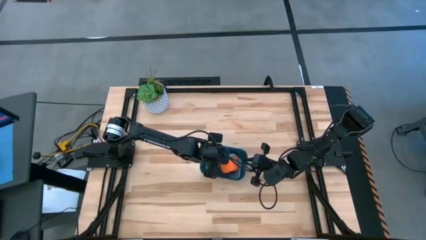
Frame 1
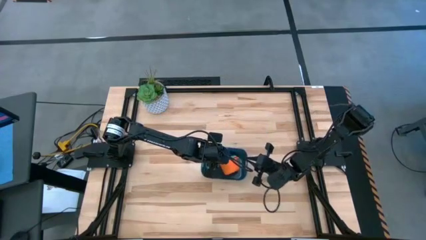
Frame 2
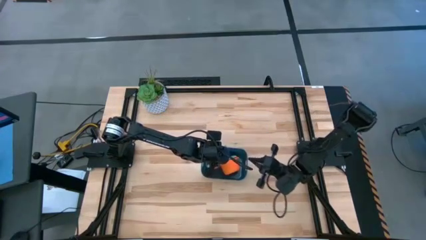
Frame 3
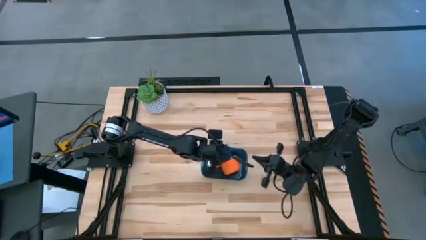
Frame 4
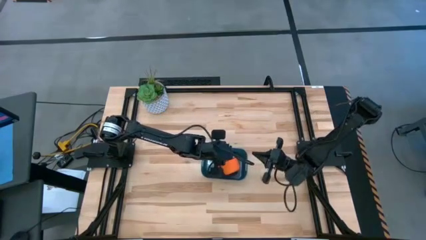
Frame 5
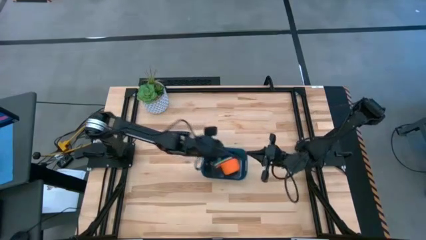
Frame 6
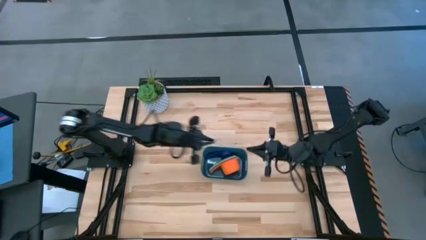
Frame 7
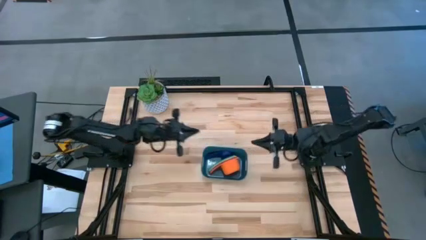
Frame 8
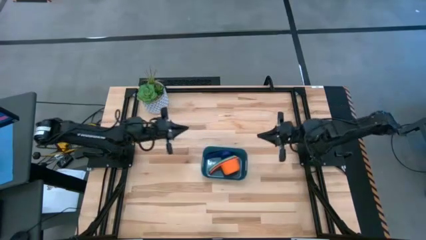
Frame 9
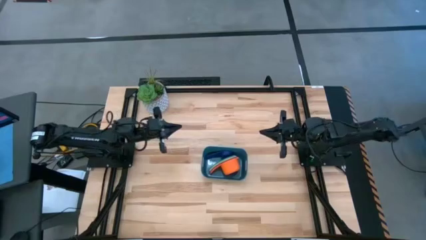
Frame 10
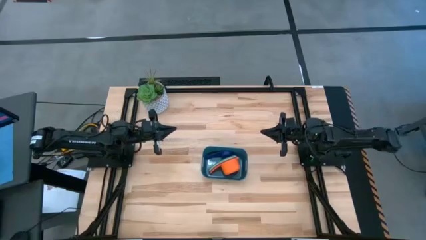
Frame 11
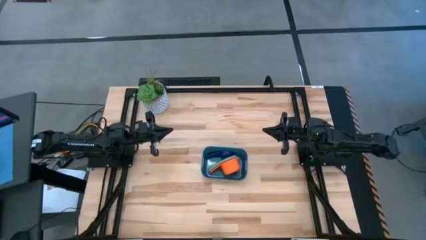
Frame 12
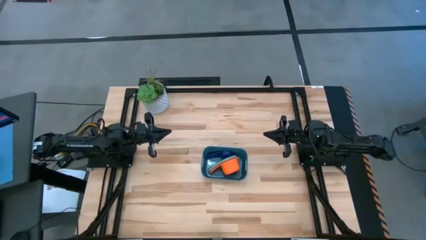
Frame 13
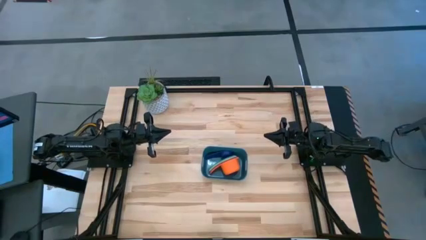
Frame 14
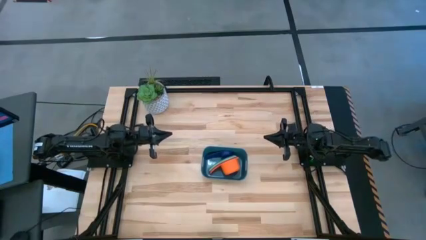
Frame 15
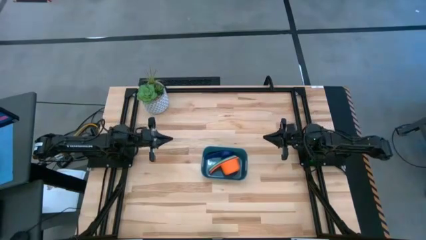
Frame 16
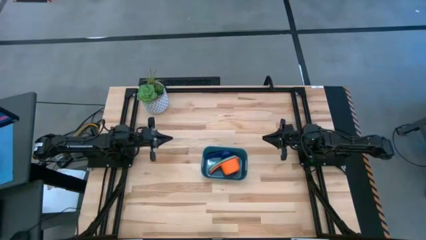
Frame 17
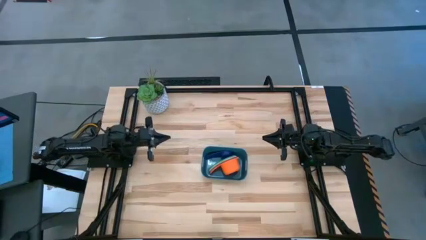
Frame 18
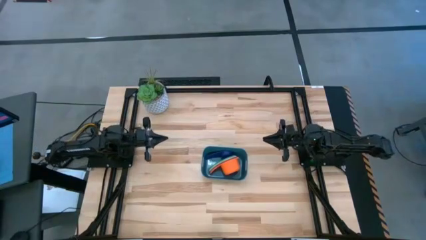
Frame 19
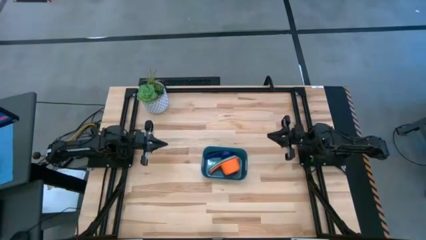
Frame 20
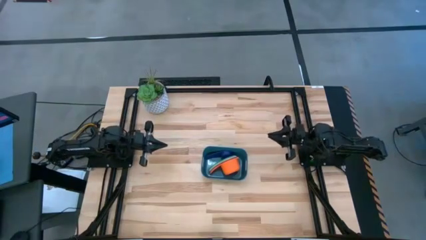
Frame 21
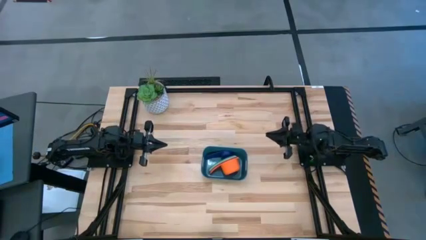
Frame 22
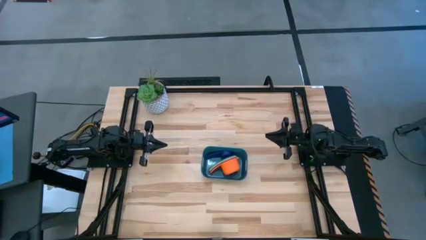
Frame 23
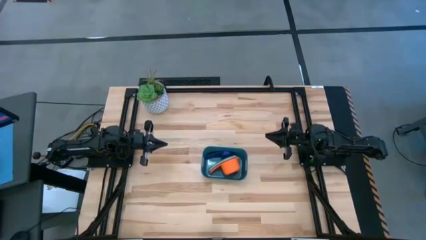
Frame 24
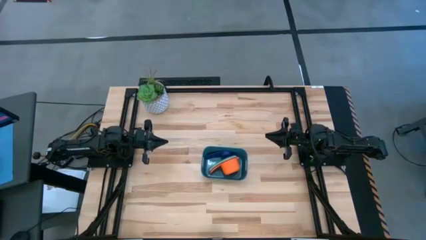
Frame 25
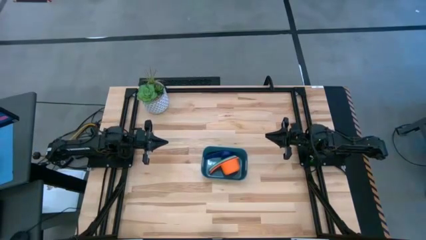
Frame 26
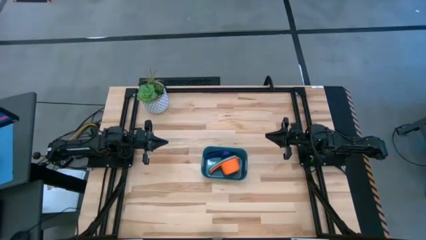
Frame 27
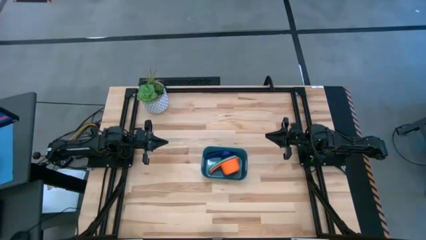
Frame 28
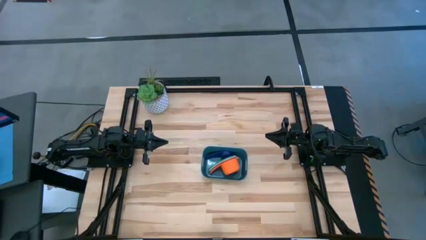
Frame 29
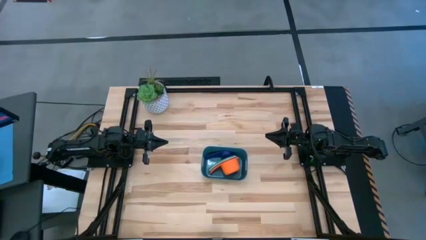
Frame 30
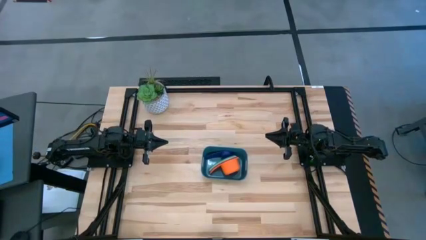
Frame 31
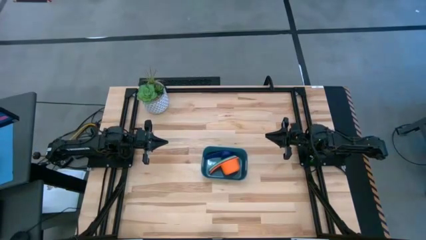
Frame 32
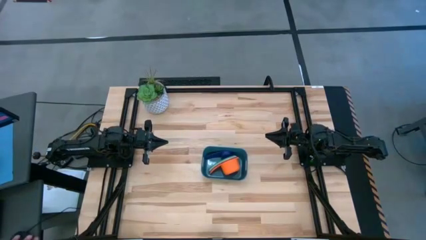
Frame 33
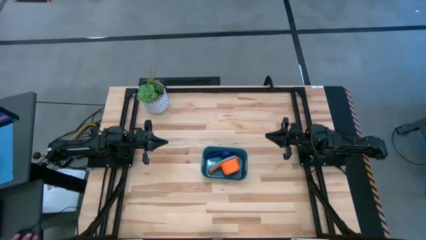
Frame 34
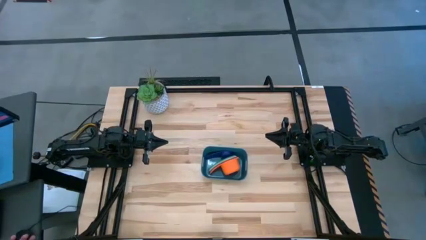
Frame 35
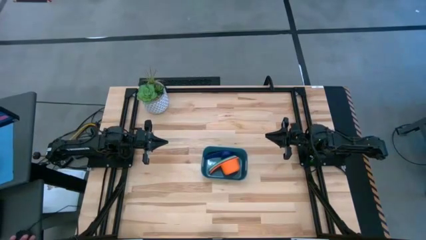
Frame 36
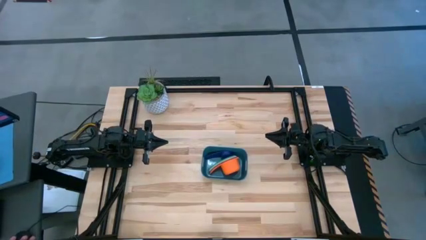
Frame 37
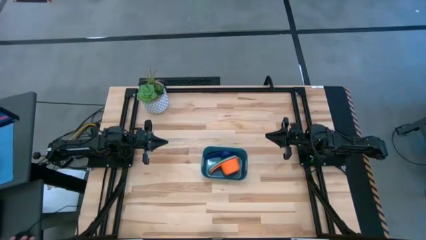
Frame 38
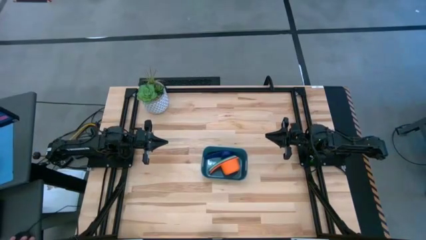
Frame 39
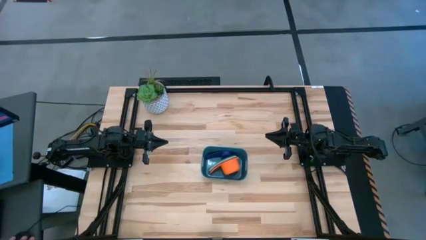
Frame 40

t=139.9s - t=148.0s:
Task: Nest measuring cups in basket
Return to Home Position

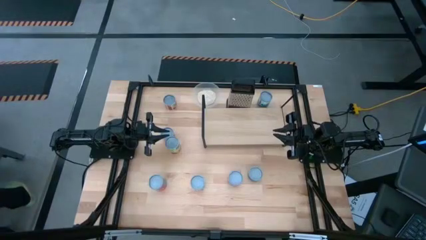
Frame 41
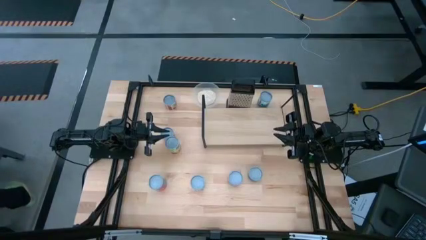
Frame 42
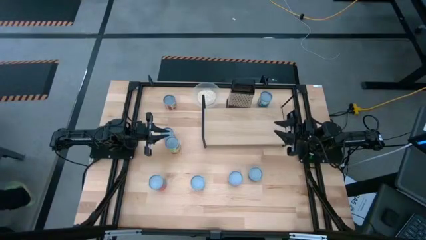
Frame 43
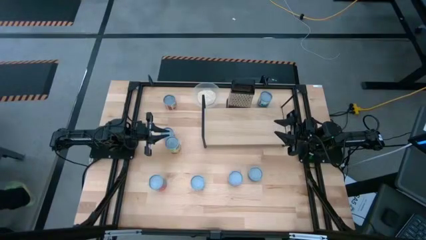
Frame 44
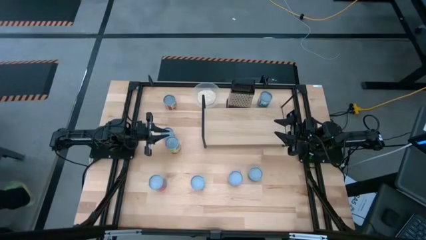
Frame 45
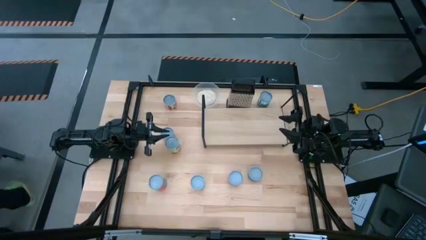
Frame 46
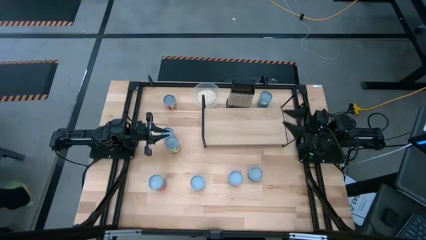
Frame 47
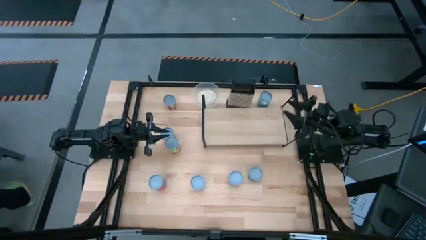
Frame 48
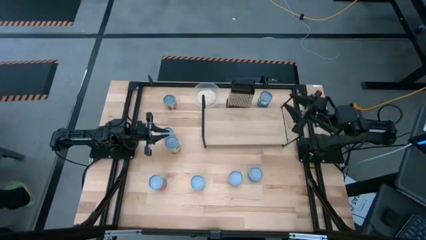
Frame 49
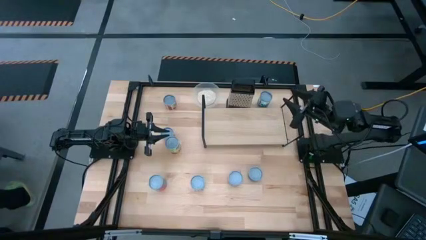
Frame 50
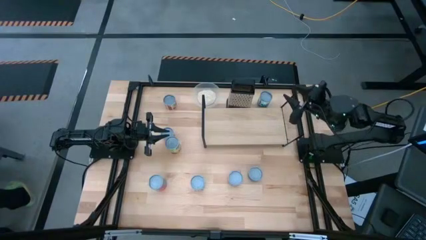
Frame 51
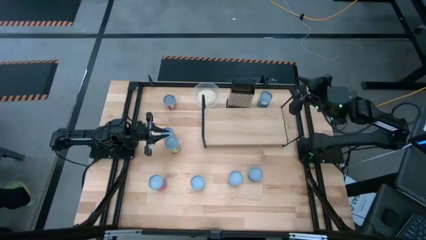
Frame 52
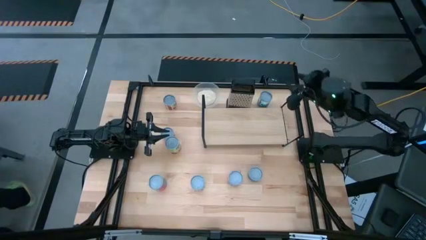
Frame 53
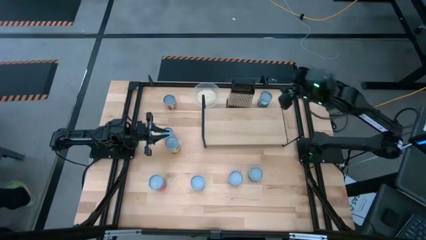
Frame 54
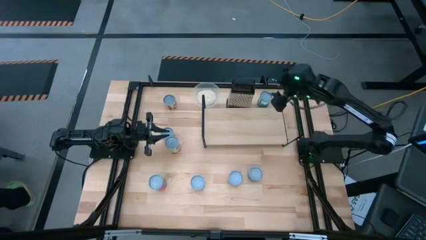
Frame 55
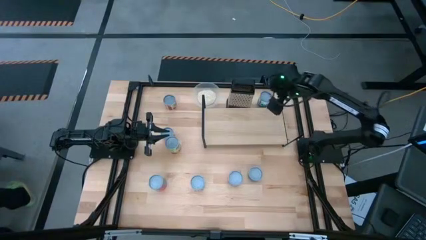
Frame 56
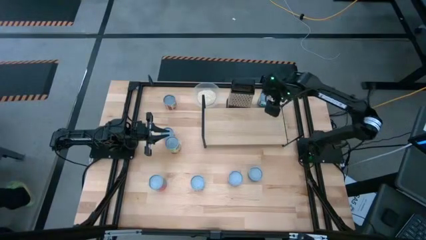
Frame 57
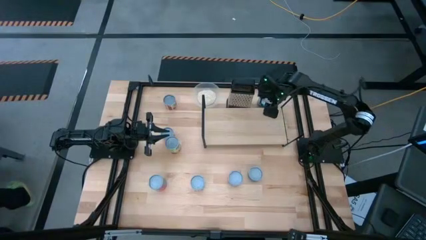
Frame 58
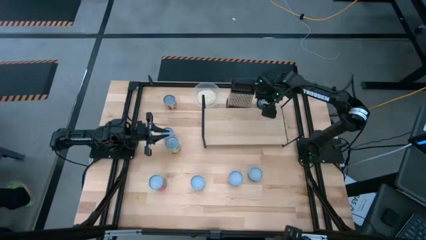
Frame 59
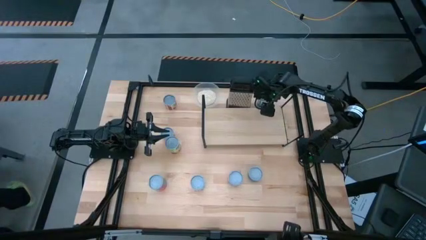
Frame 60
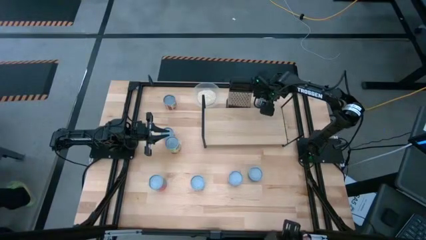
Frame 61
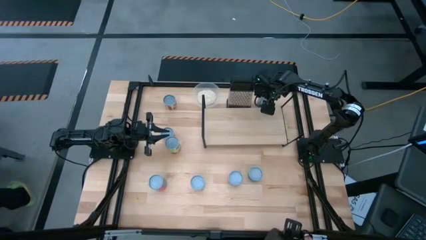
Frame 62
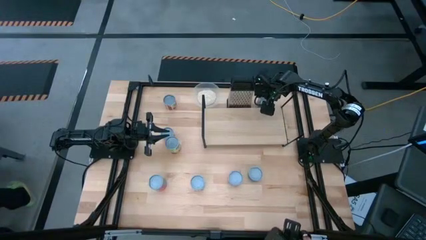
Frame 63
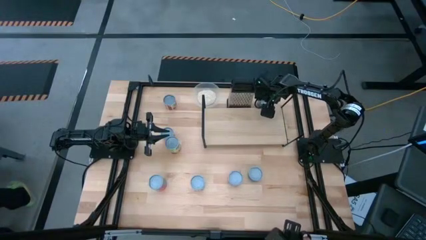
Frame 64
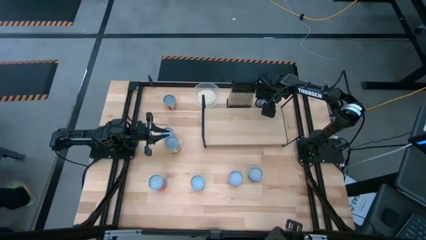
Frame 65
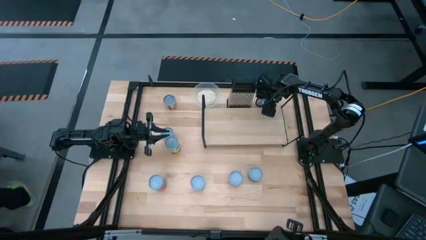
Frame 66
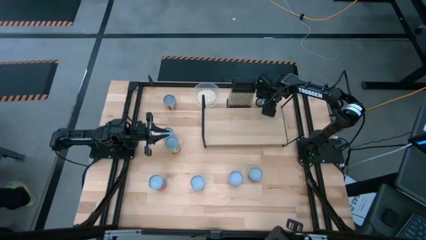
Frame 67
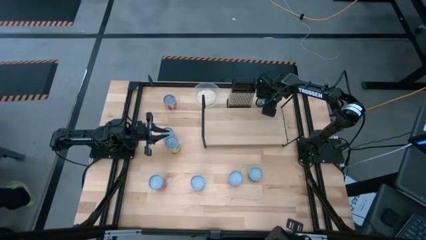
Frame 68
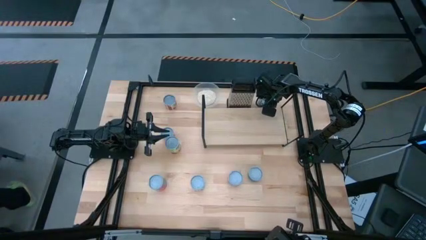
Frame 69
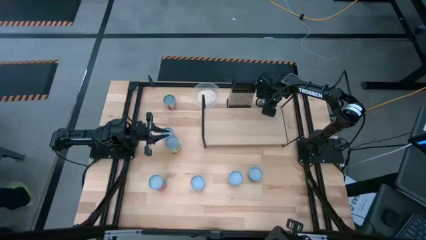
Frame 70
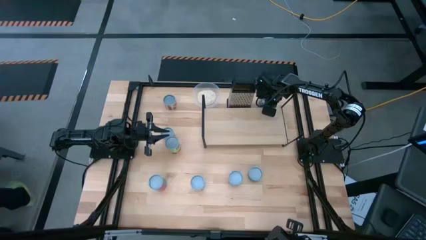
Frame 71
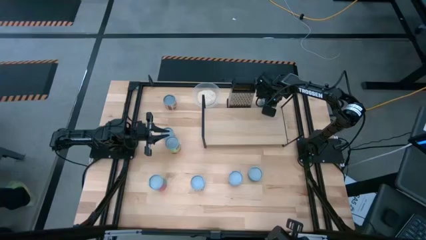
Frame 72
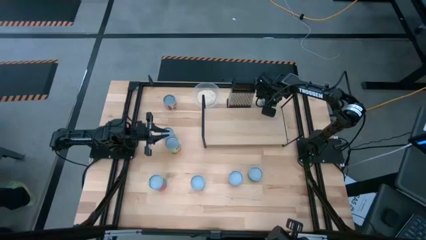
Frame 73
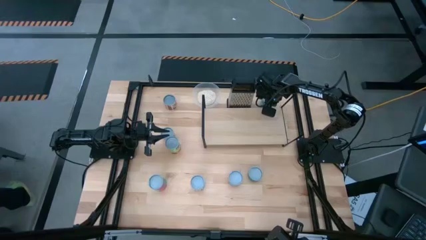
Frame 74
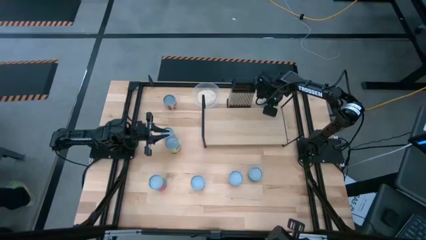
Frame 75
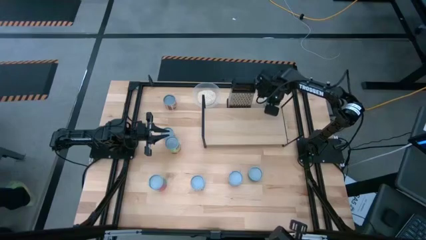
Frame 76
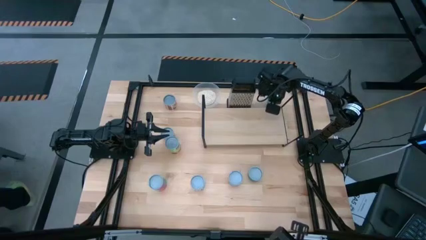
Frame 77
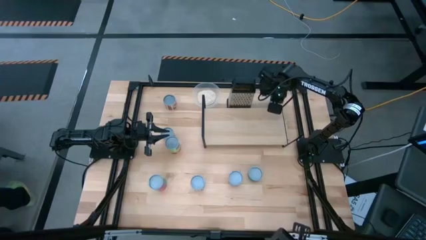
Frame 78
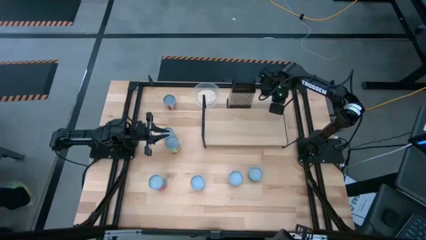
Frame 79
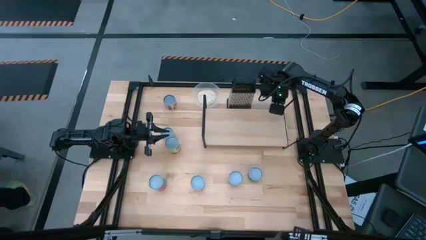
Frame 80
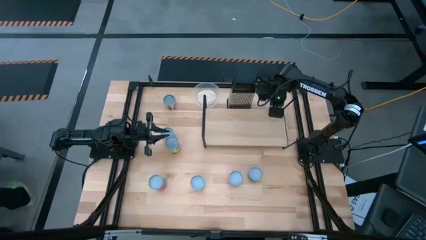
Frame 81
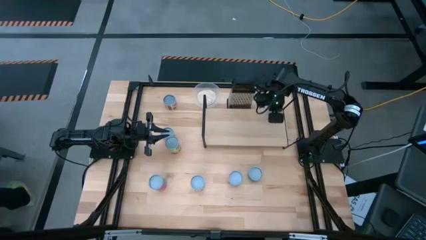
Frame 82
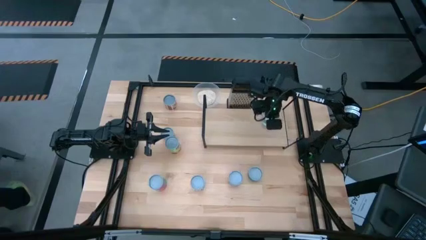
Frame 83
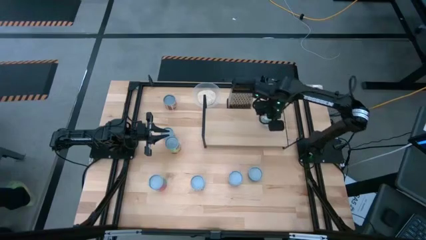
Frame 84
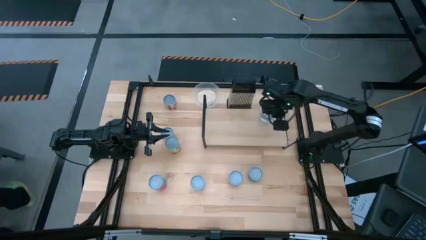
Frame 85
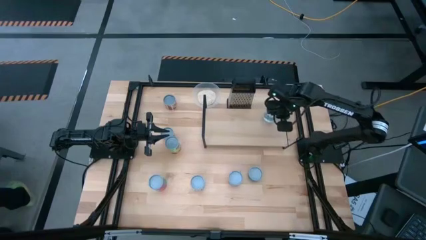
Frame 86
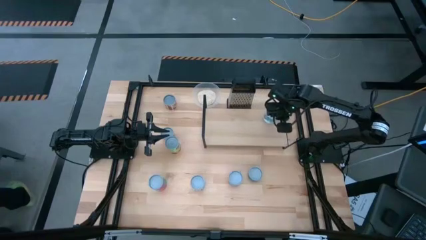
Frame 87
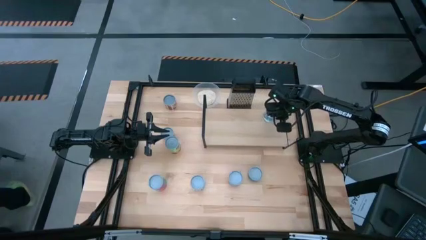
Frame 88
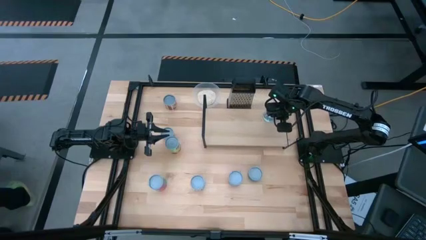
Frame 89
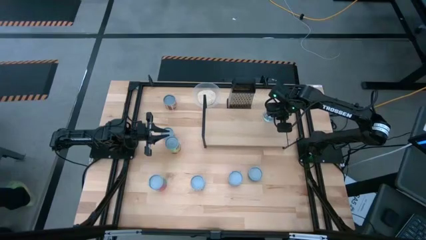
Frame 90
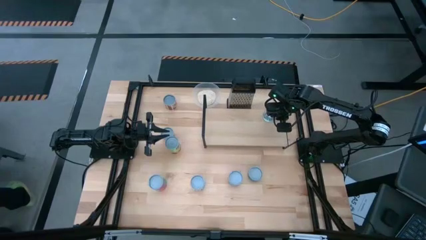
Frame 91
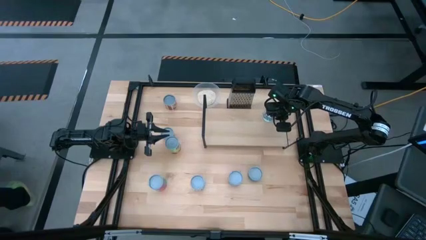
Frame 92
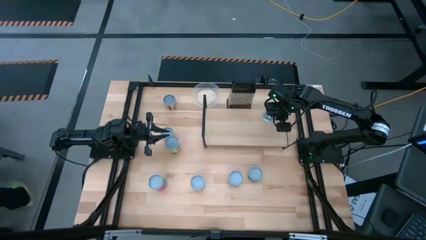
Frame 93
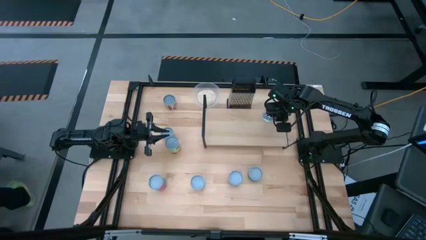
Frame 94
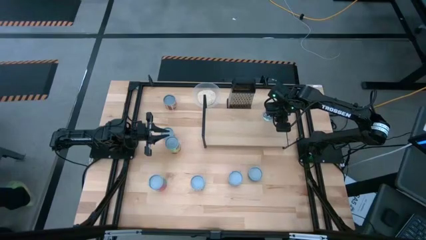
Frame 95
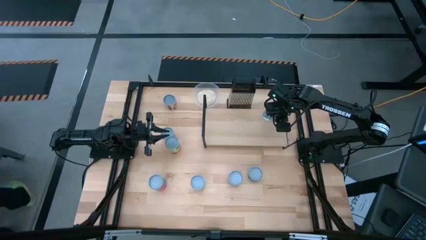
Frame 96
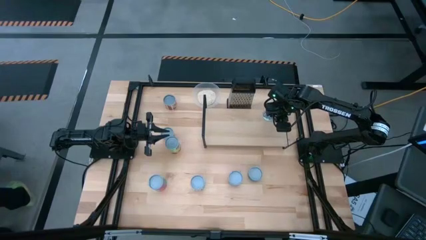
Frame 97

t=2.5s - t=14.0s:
Task: Pick and place cans onto a shelf
Put the canned mixed vegetables on the shelf
